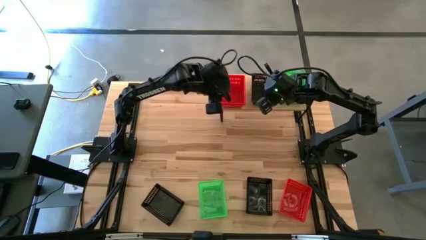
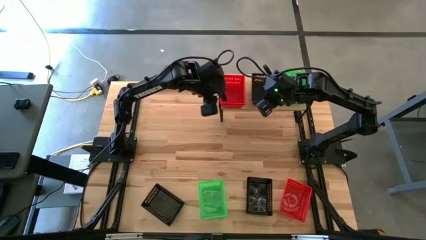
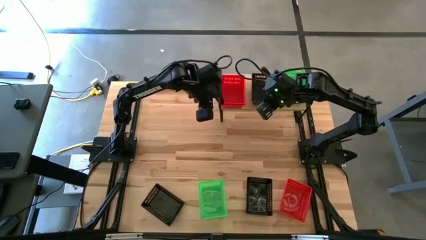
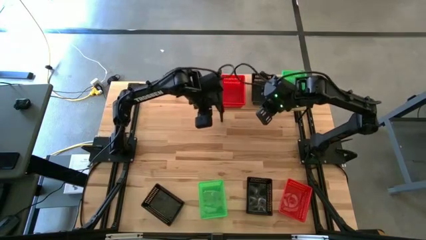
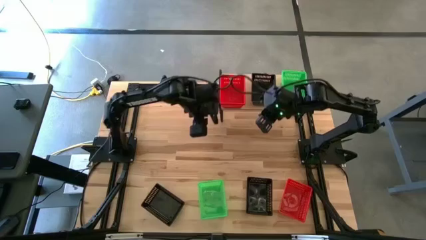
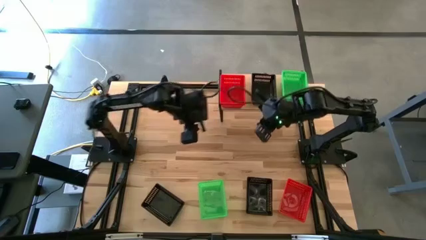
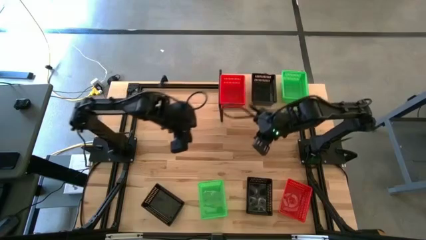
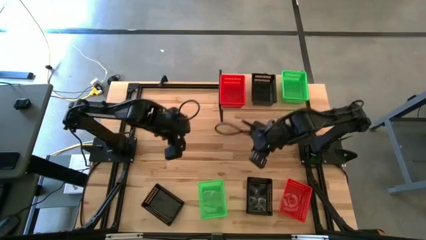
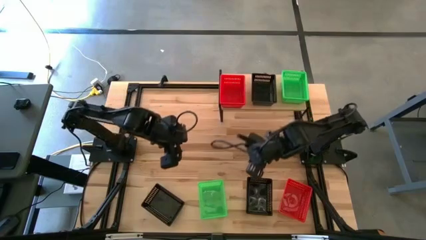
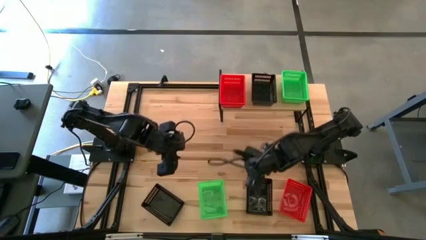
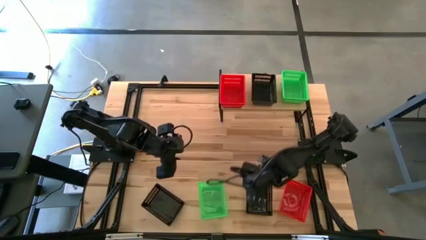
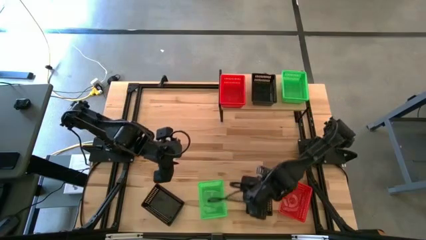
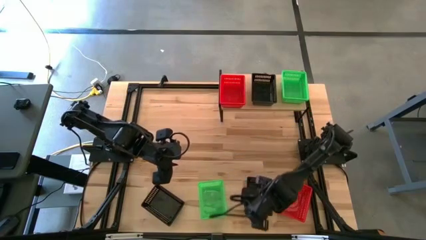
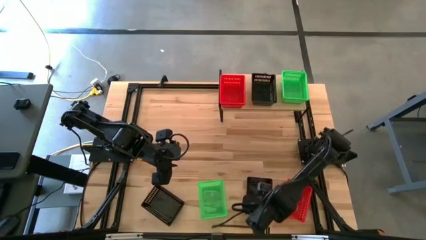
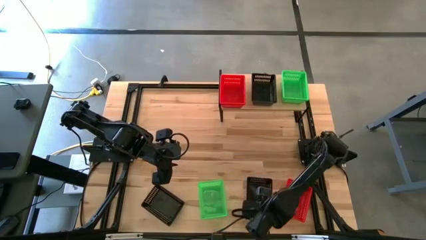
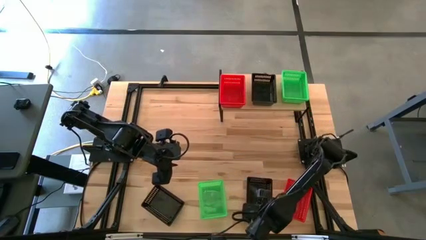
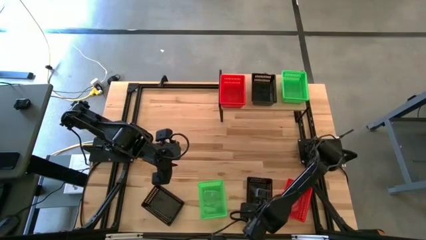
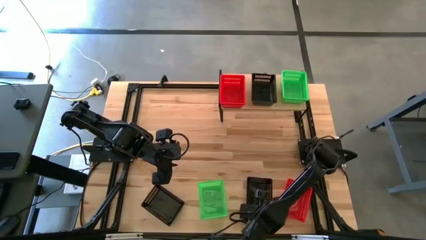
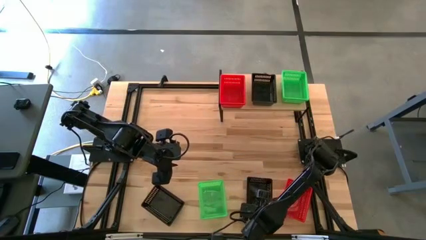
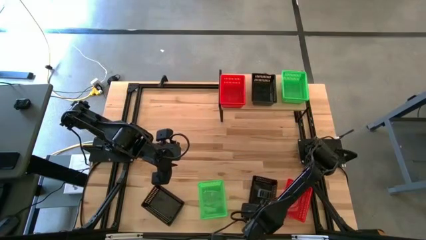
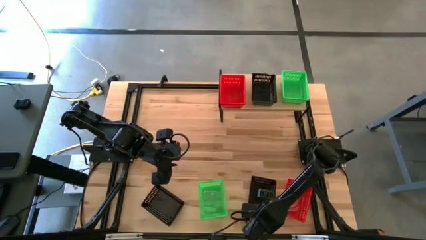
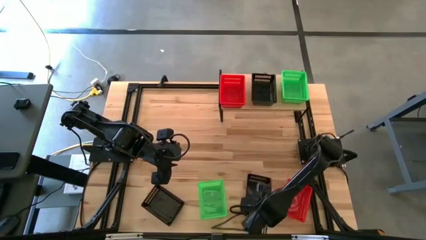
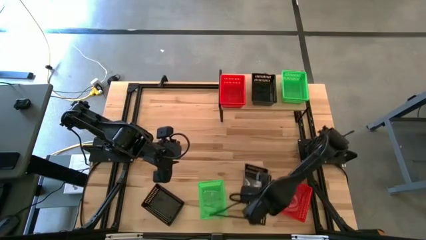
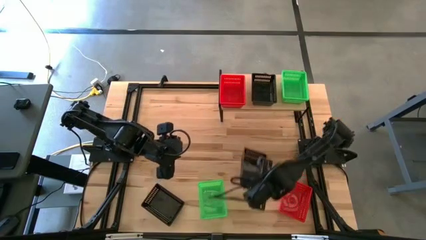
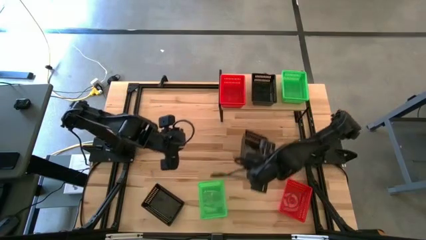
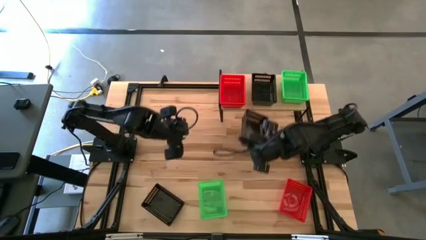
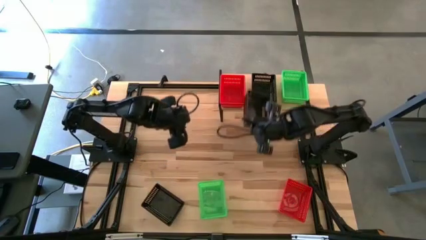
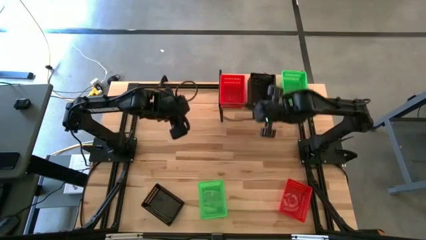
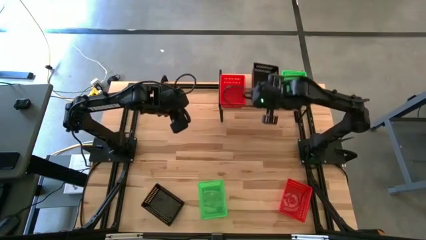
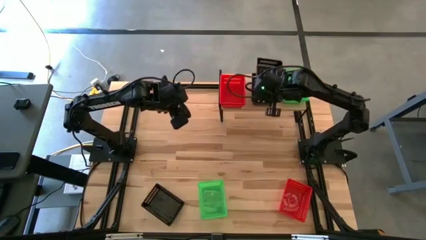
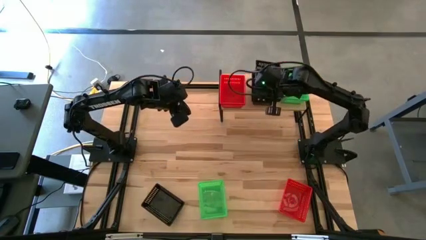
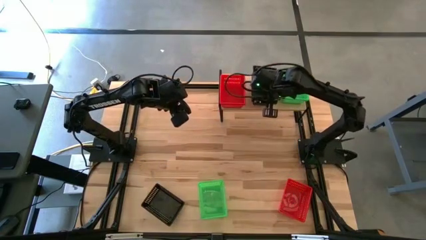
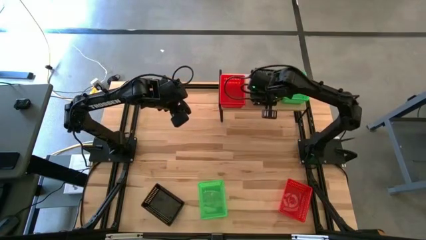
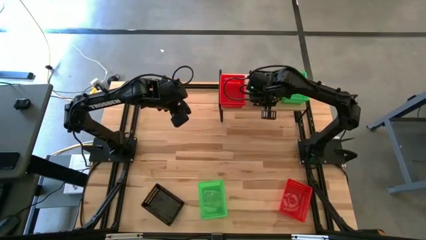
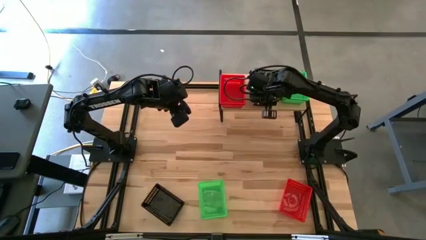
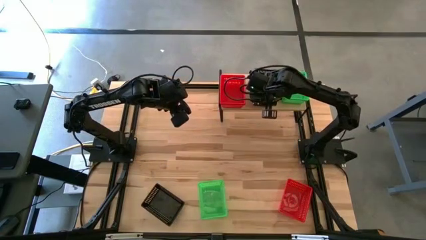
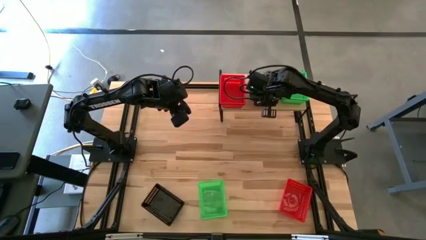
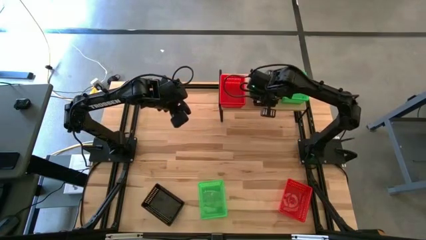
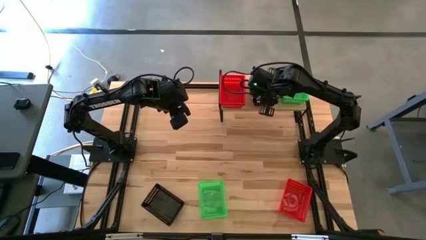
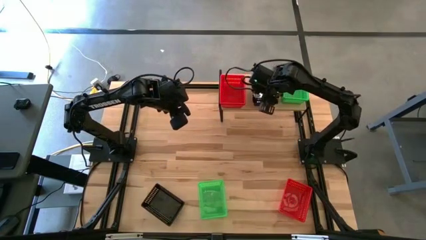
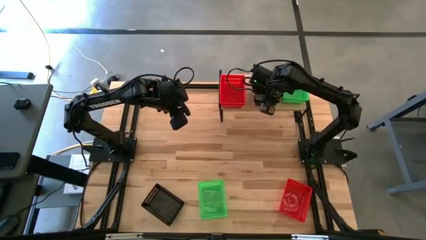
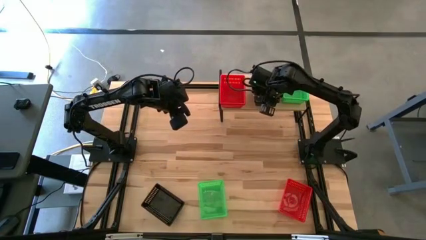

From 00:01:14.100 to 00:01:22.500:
Task: Stack baskets on shelf by color
Stack the right black basket on top of the other black basket on the shelf

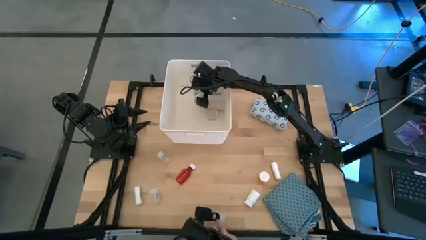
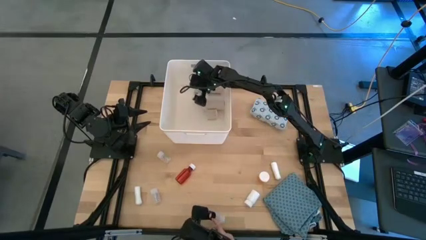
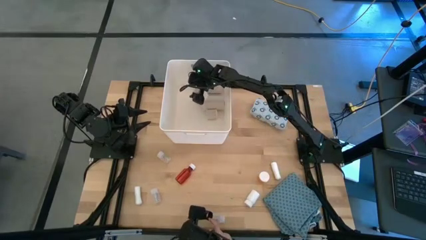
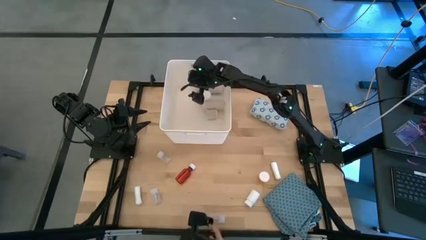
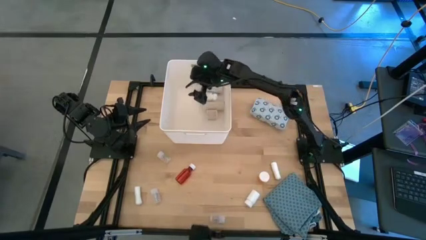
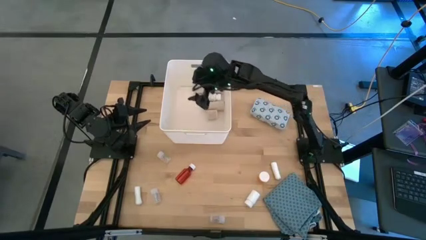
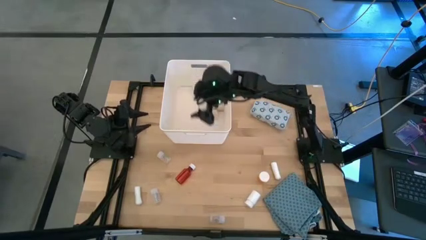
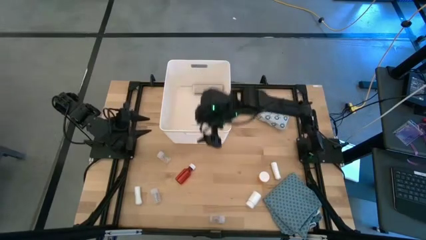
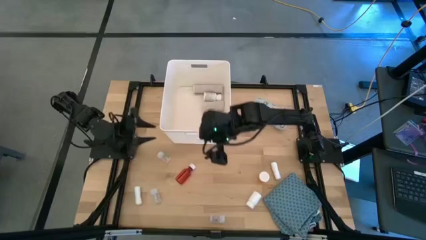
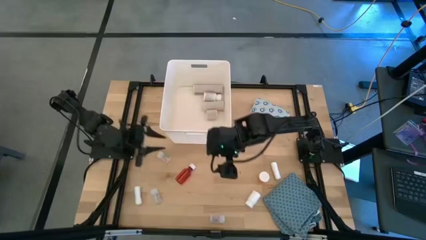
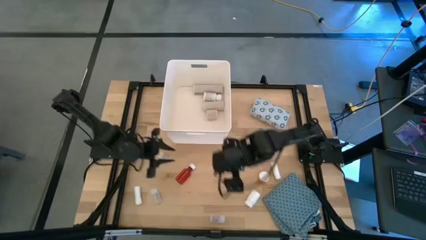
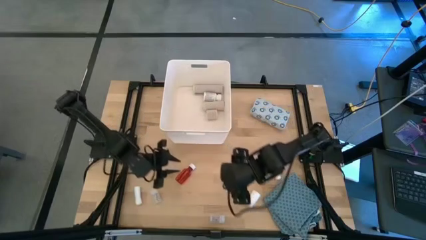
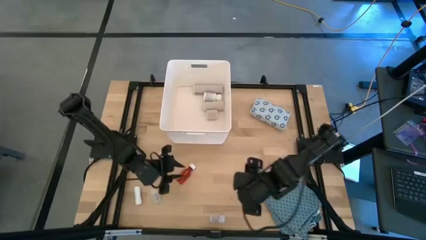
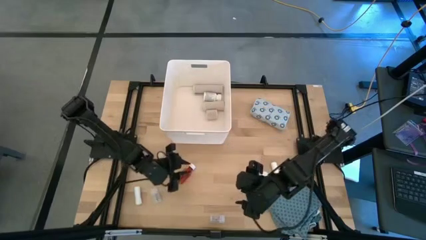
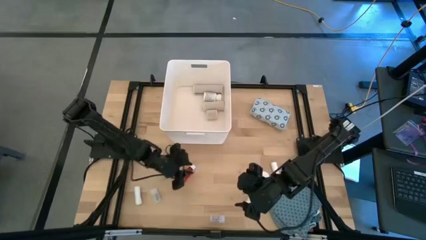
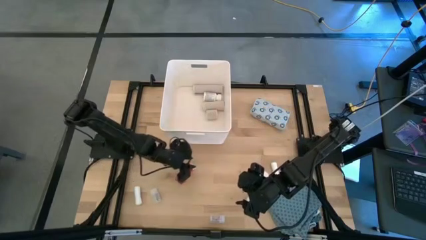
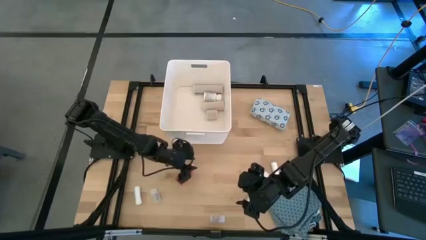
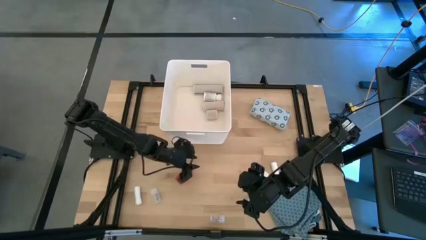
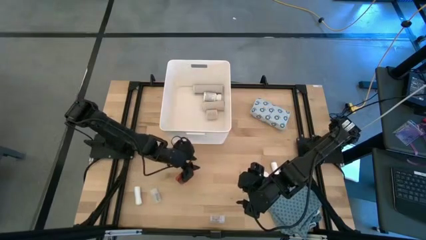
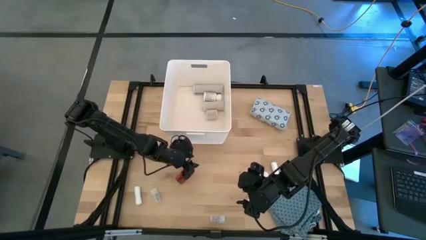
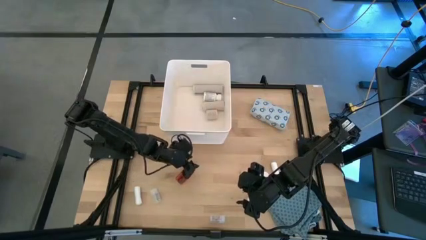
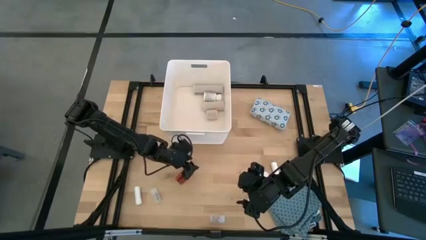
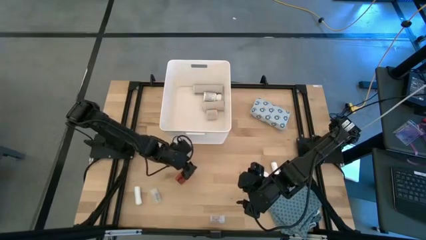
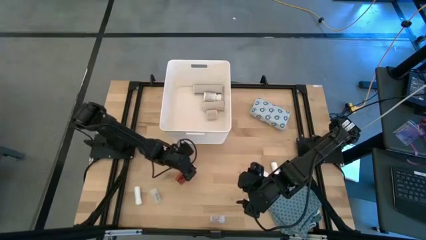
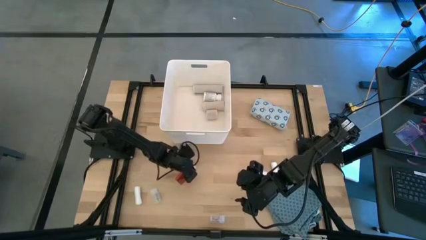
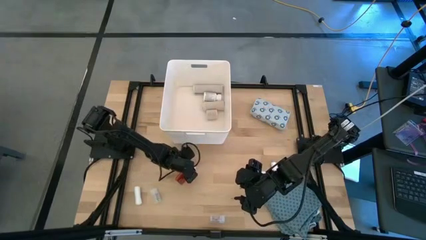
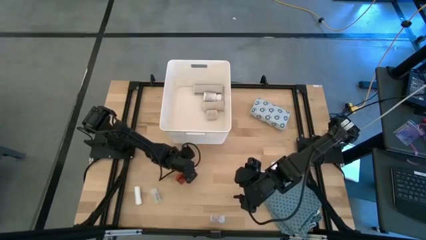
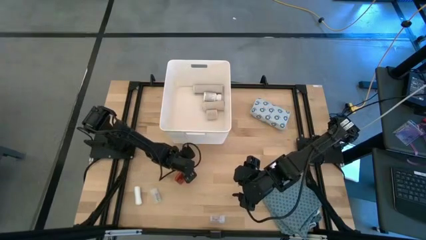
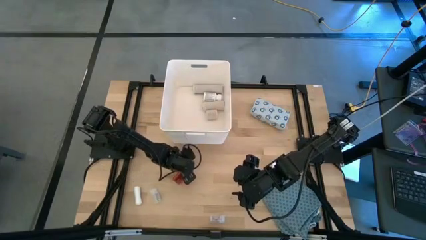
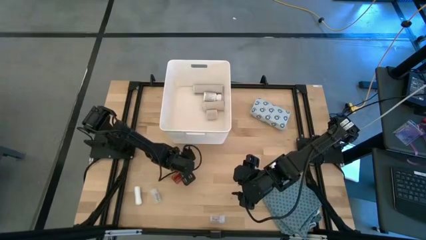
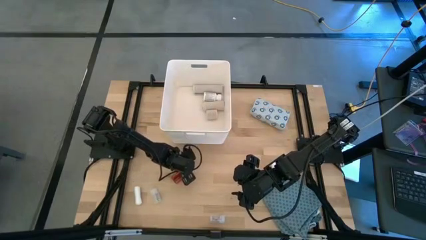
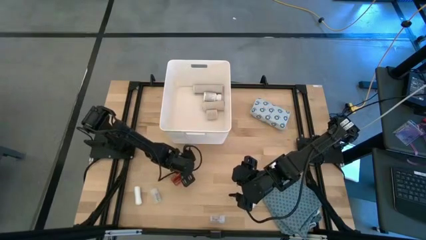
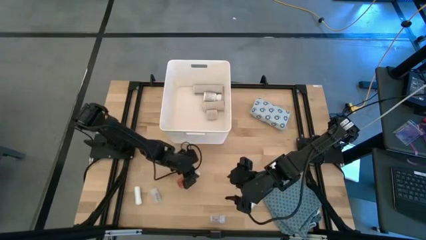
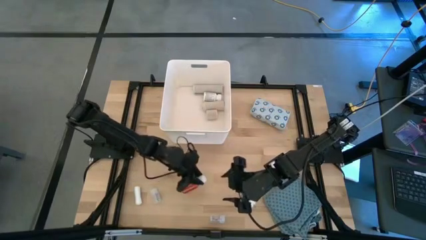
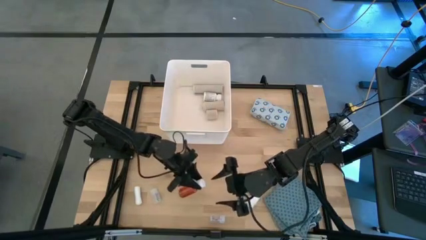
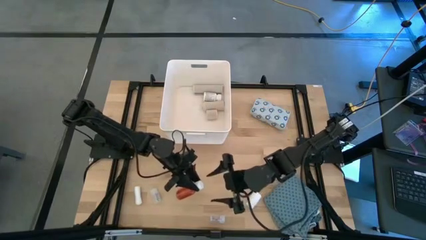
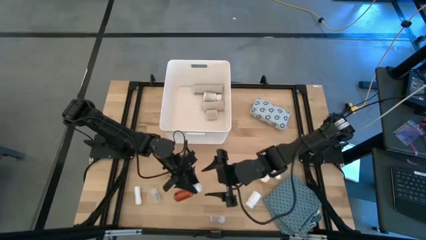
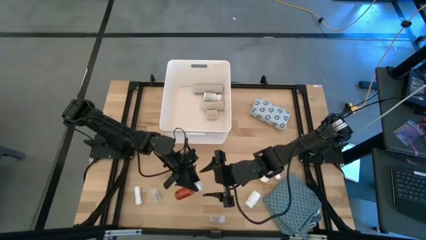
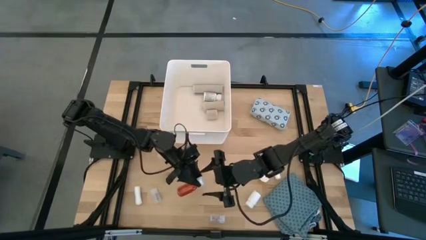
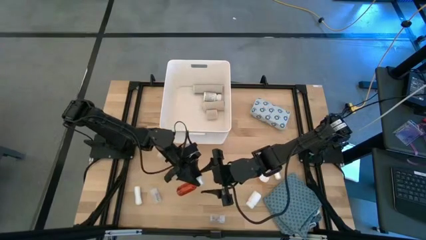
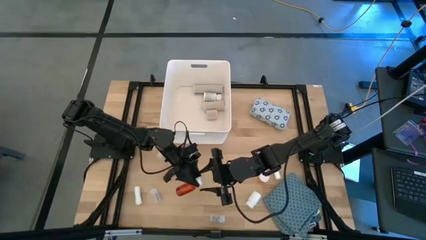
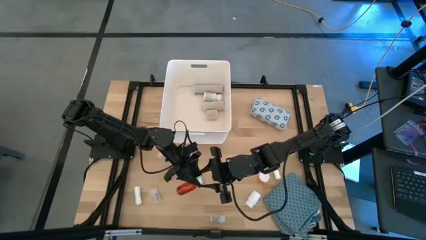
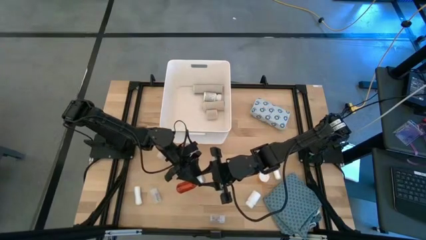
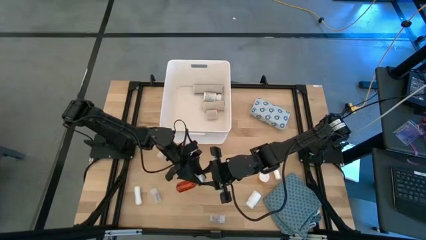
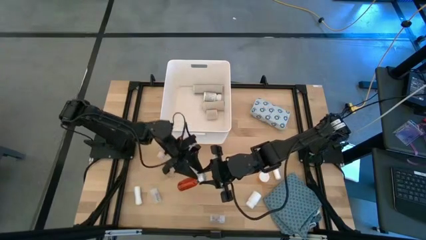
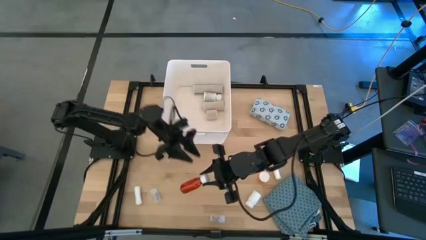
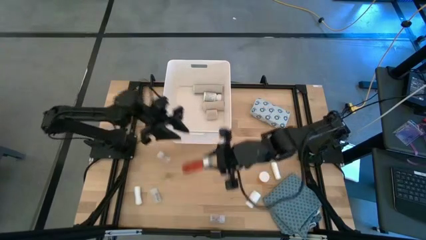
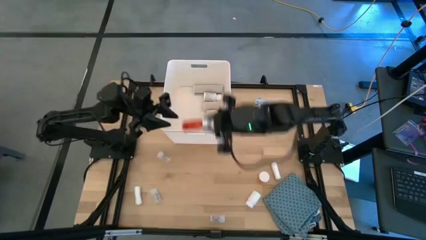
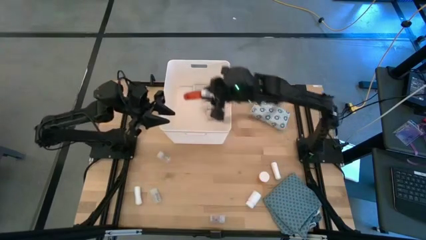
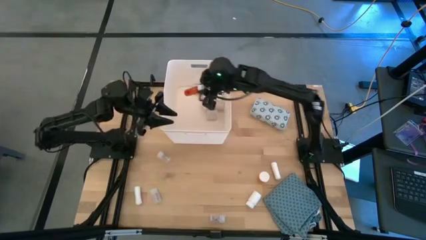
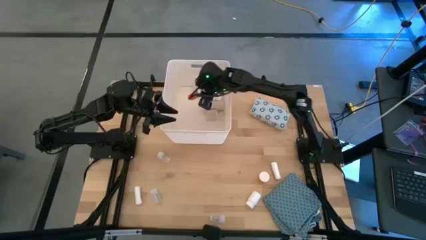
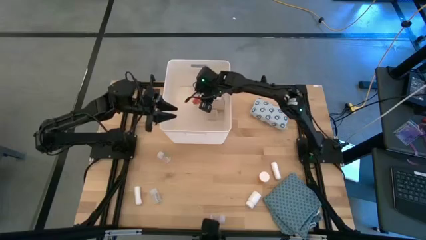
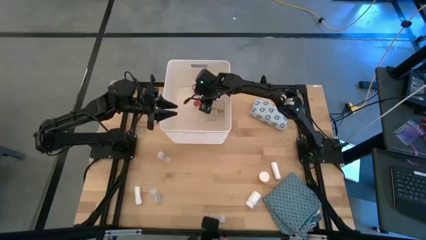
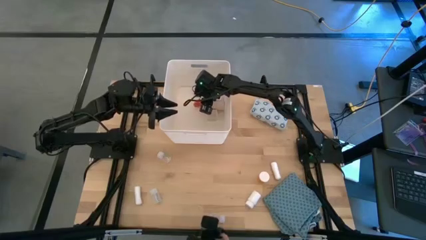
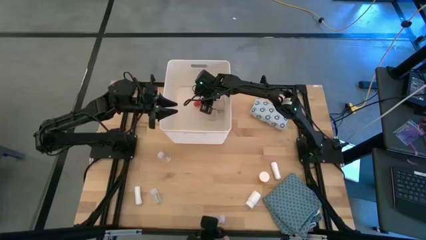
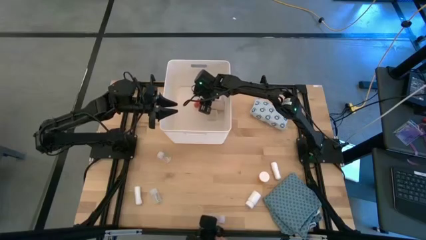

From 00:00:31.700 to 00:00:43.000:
Task: Pick & place medical supplies in basket/bin
Put the orange pill bottle into the white bin
